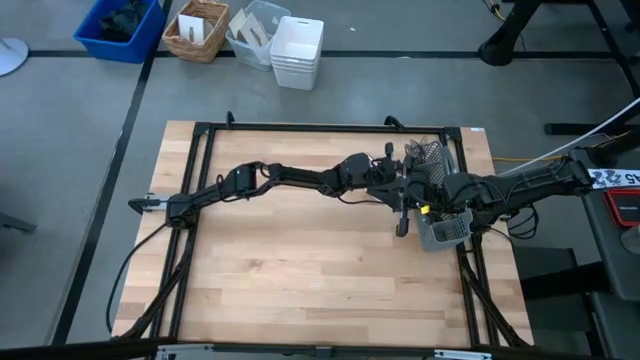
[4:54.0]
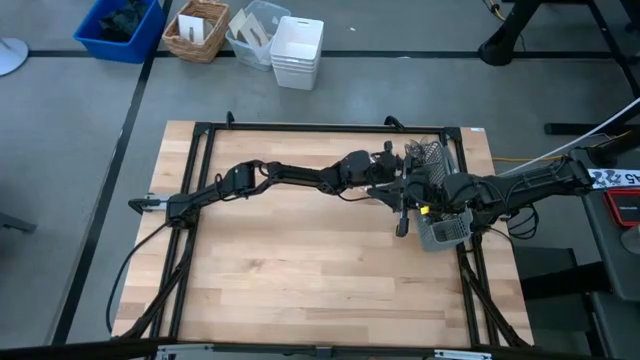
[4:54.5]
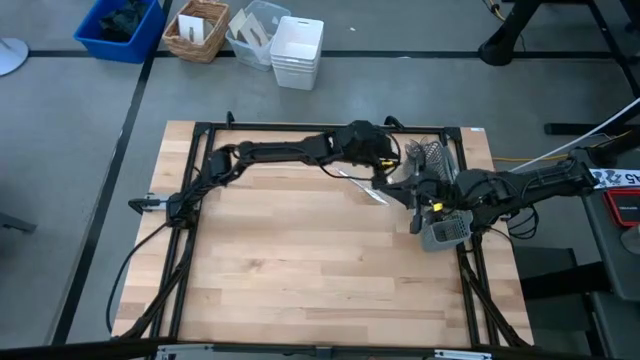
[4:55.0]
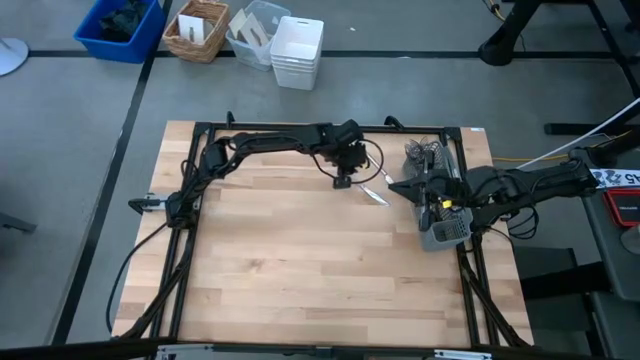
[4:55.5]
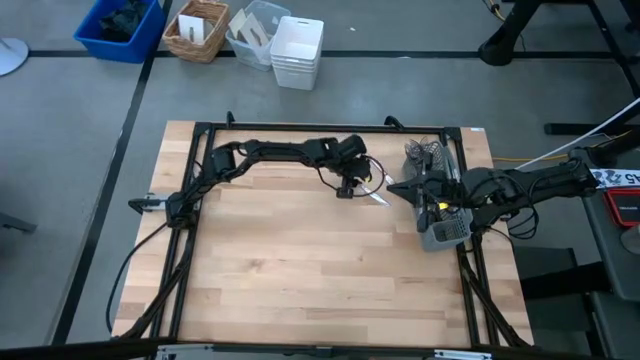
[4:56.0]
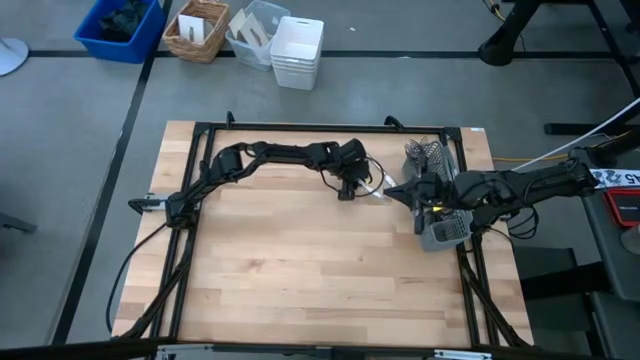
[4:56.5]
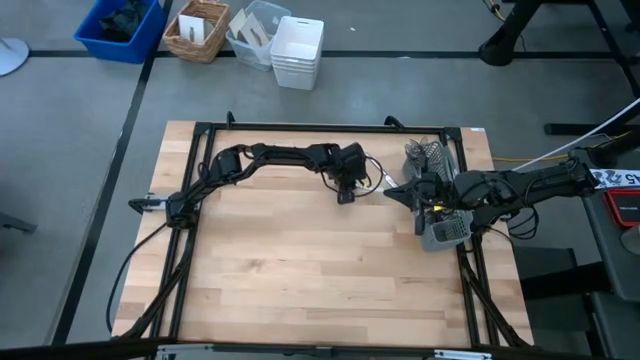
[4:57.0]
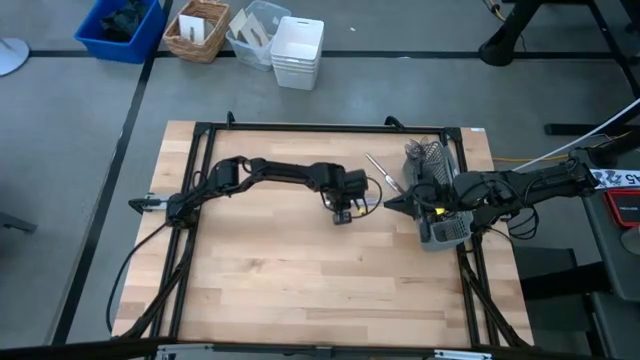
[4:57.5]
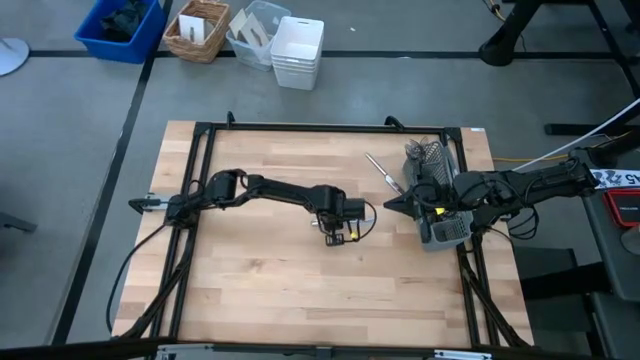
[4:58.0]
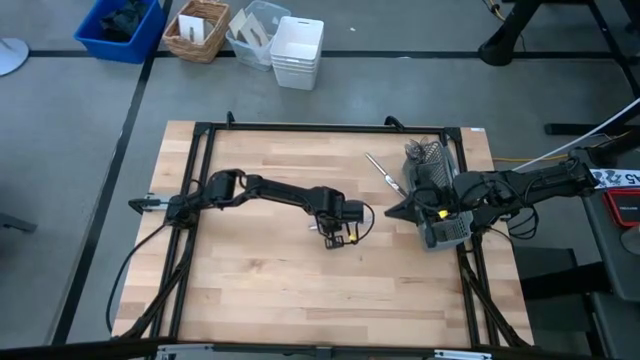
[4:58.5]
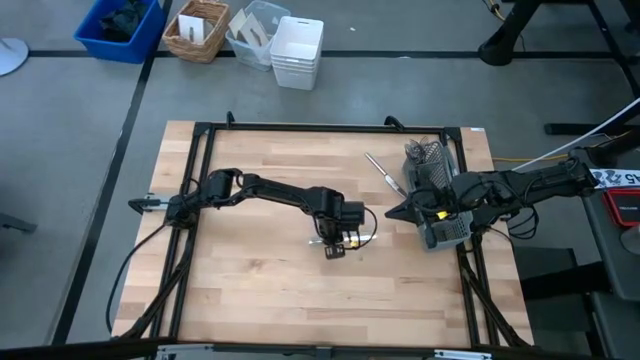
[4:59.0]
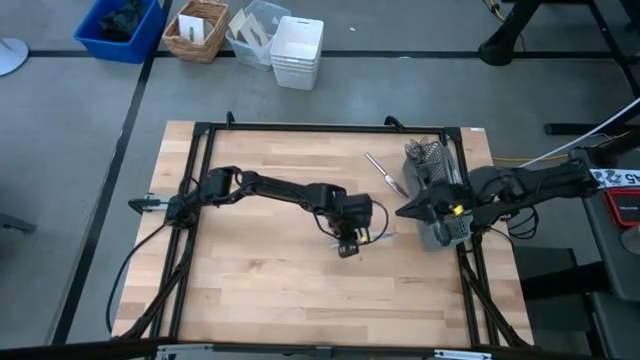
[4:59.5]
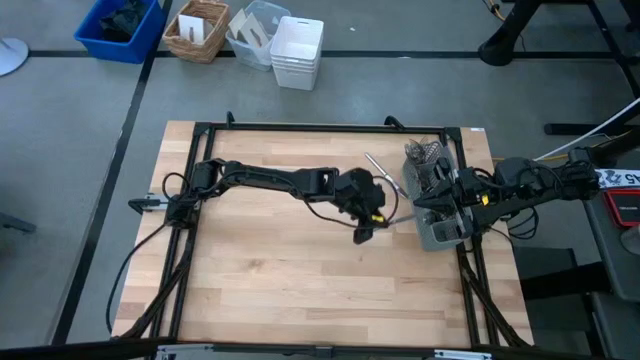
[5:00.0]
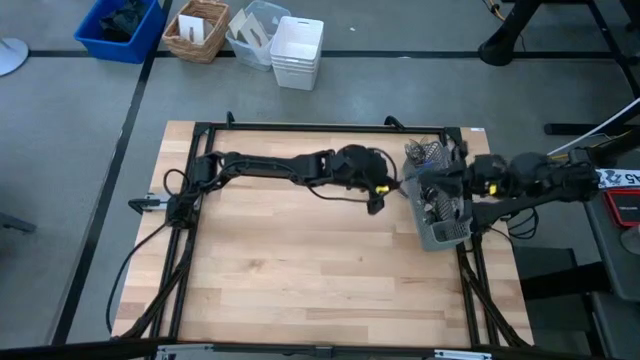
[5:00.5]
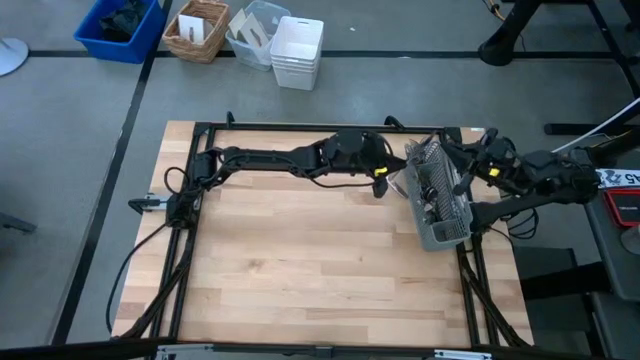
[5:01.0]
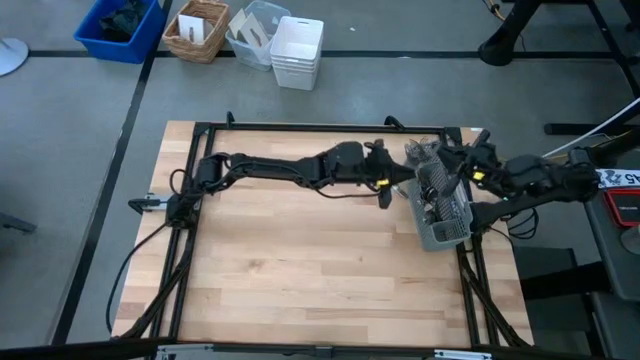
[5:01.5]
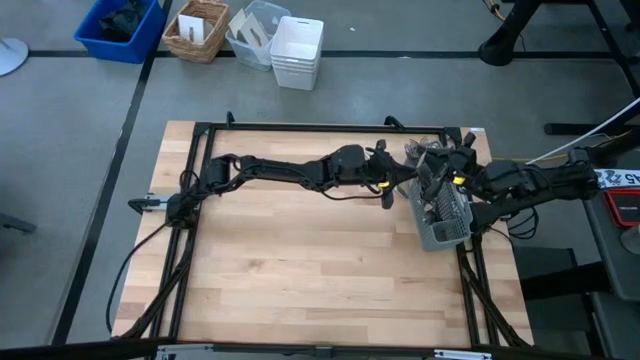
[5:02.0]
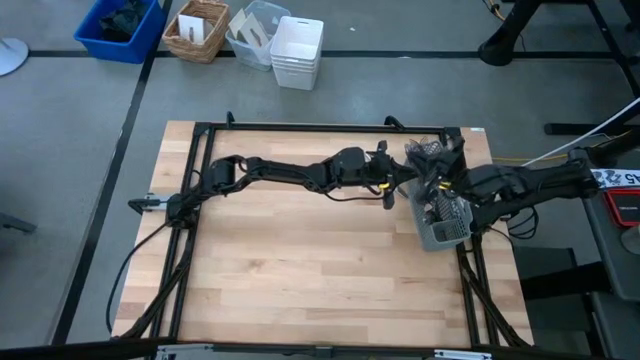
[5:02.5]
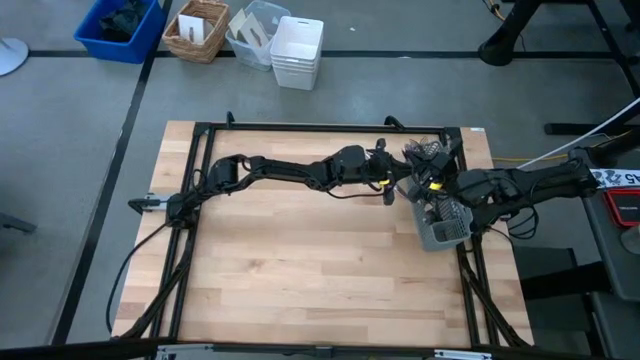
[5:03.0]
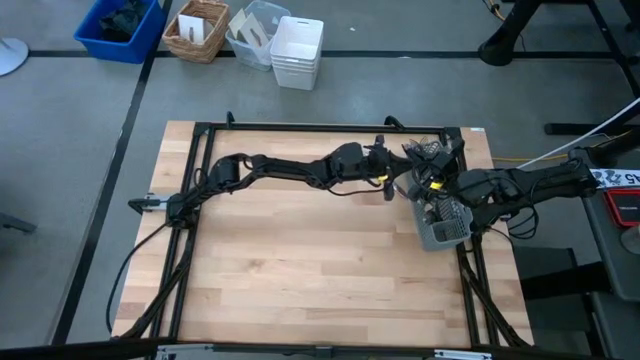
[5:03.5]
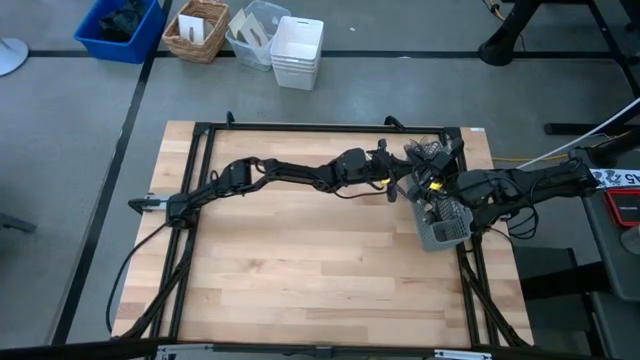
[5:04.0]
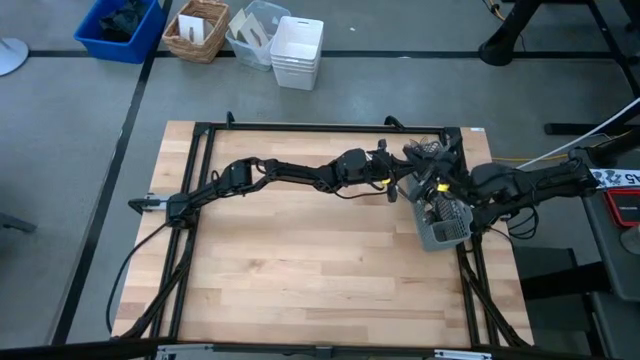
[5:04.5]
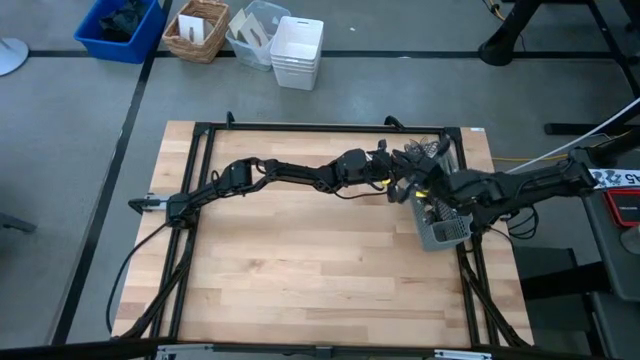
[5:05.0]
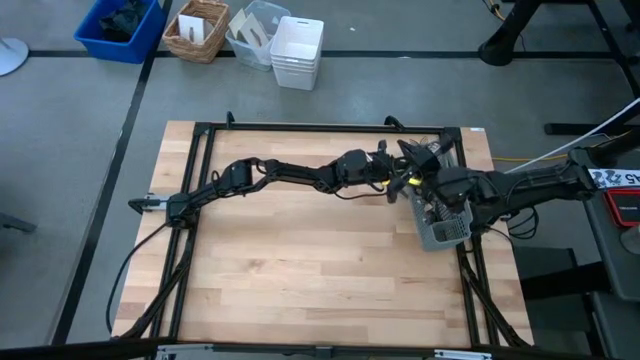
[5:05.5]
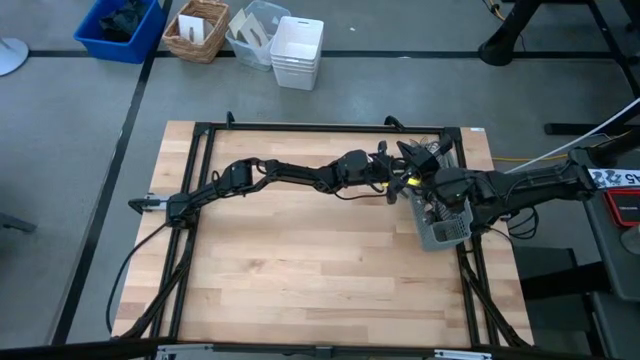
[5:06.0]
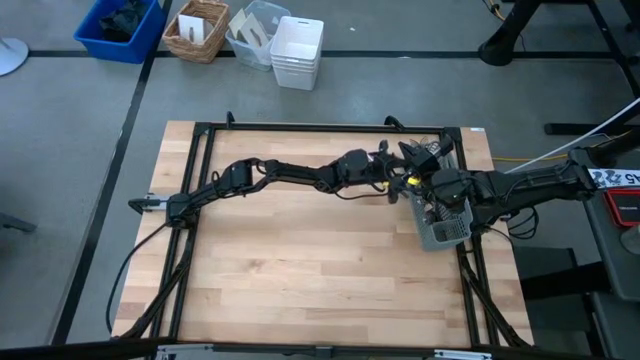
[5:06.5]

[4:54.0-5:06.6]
Task: Sort silverware
Put the bottom knife into the middle section of the utensil holder

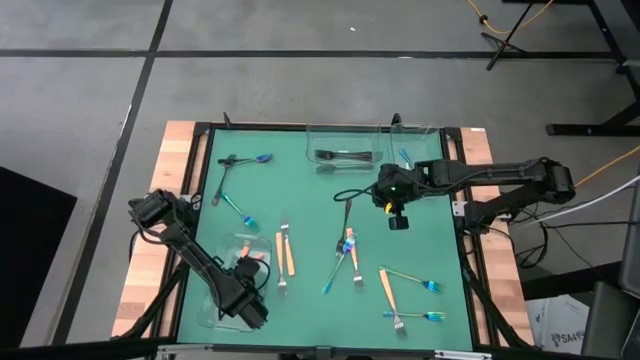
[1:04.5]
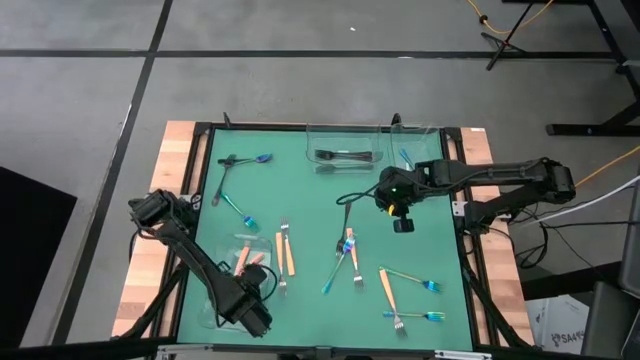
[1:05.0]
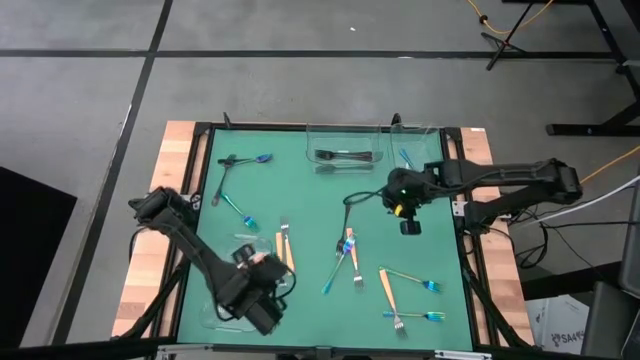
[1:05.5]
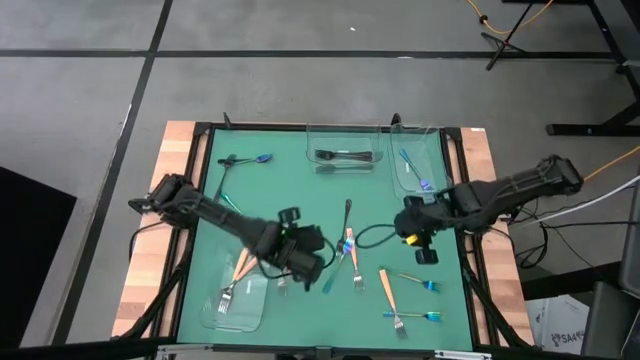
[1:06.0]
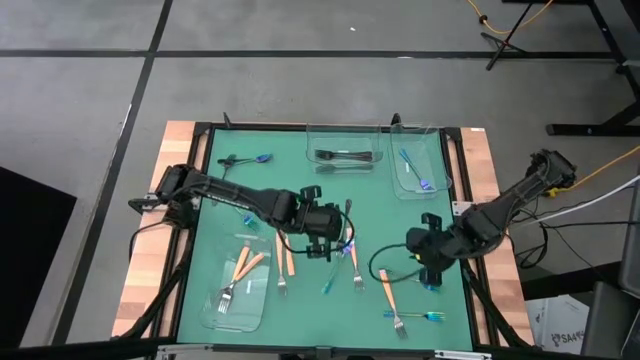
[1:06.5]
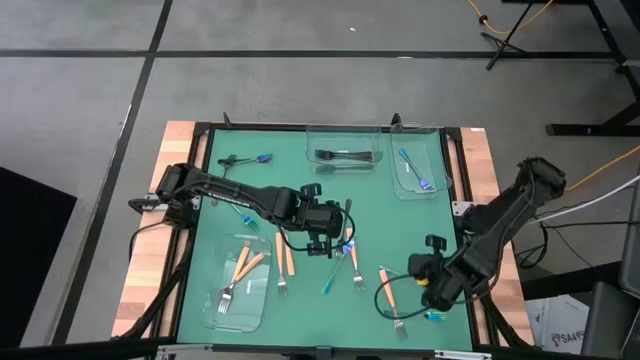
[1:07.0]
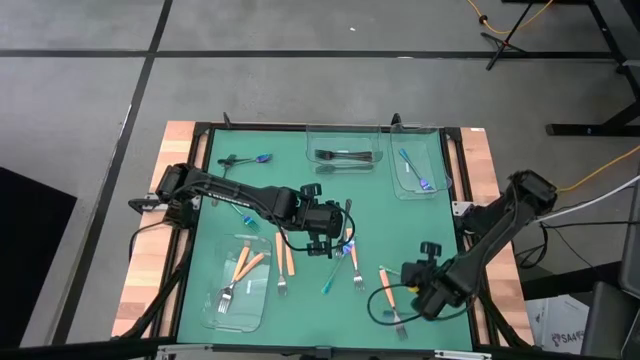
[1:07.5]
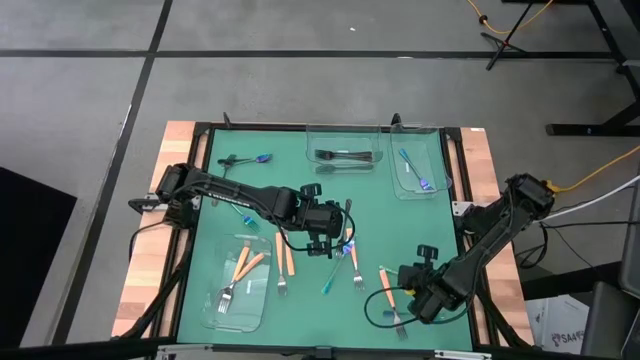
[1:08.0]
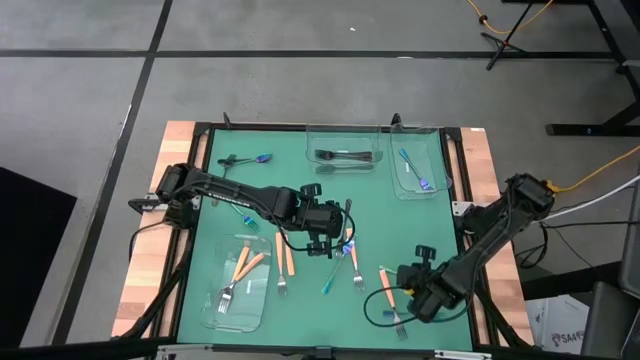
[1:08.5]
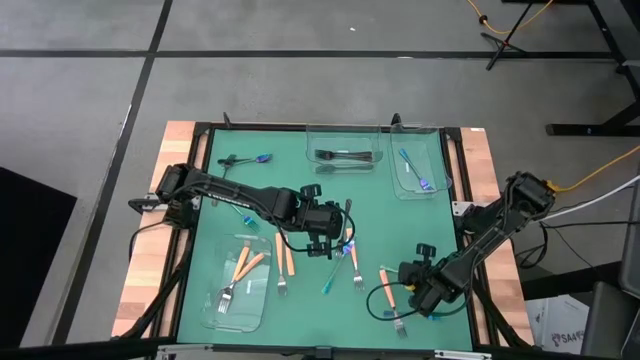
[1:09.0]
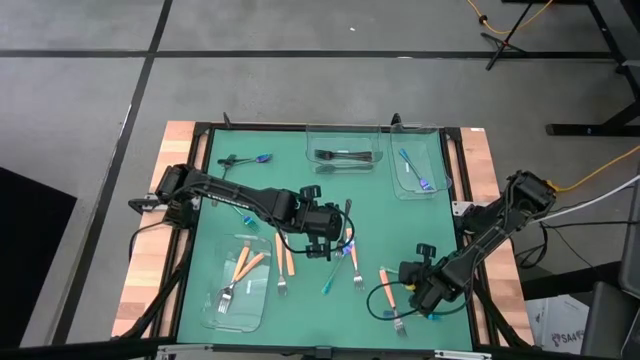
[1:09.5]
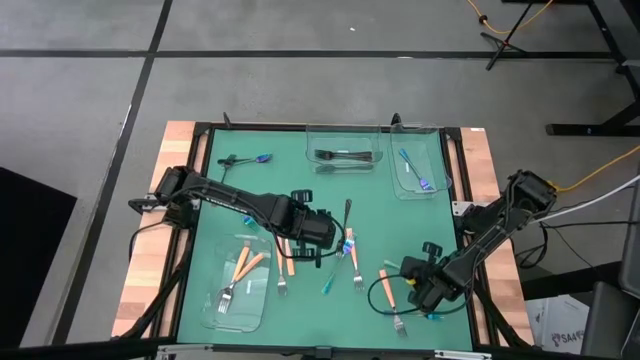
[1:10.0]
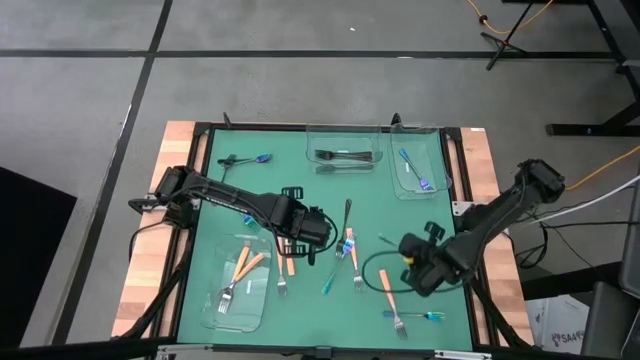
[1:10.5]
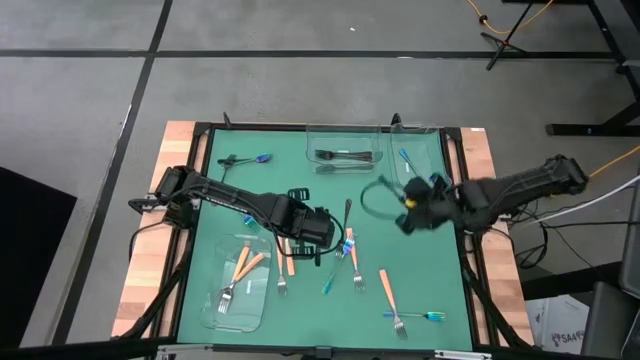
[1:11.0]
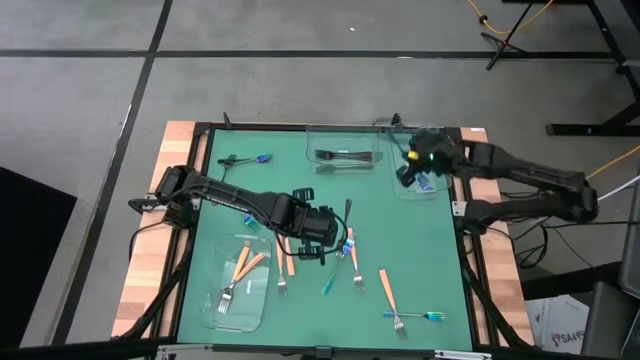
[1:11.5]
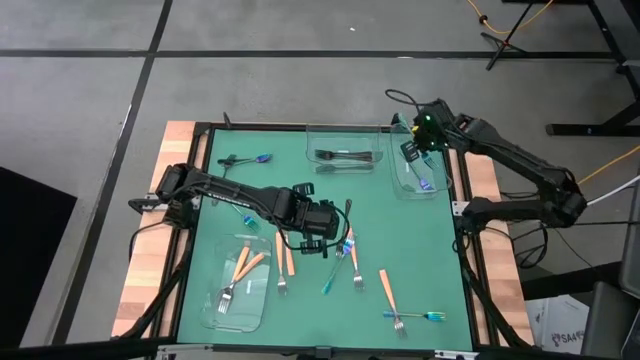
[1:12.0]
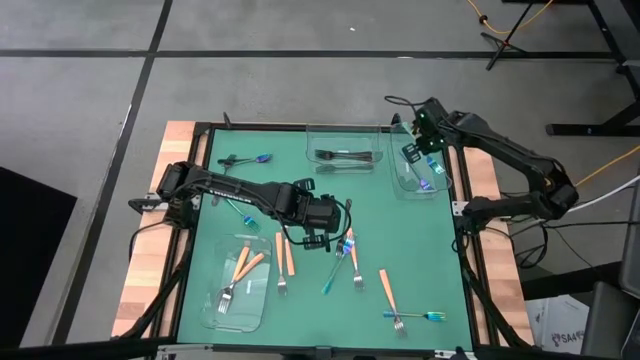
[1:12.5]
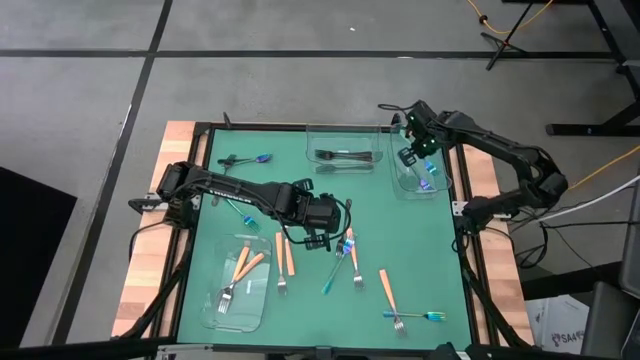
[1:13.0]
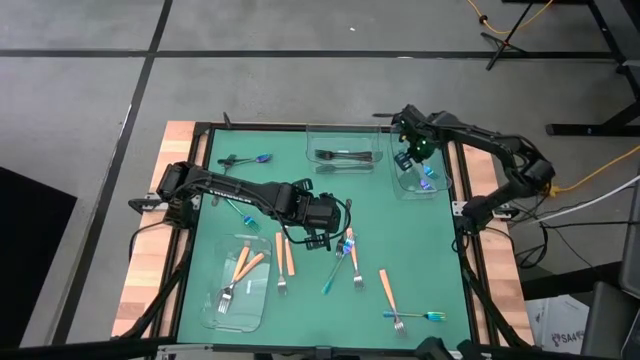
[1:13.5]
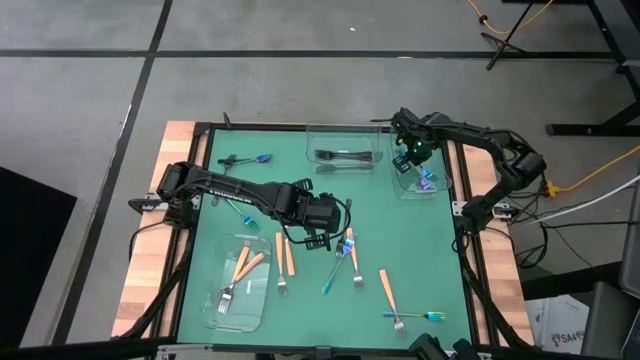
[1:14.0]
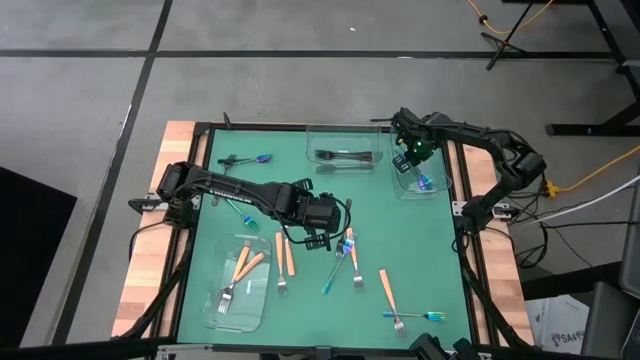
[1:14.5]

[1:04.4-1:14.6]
Task: Sort silverware by color (type)
Put the blue fork into the top right transparent bin
